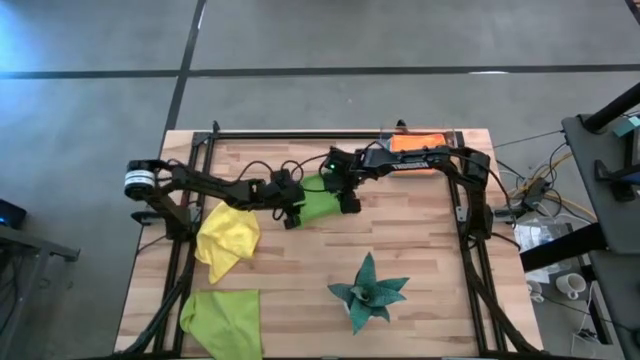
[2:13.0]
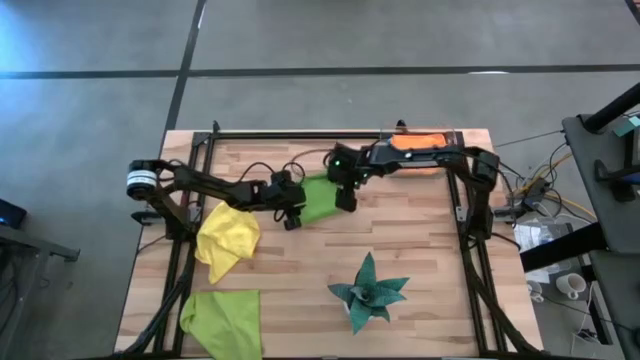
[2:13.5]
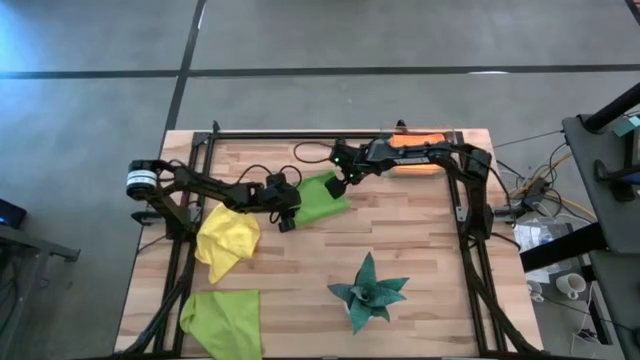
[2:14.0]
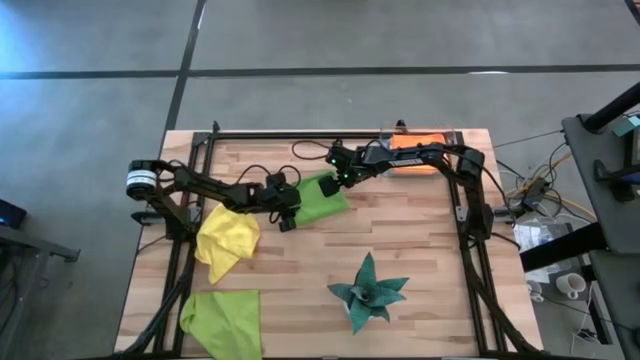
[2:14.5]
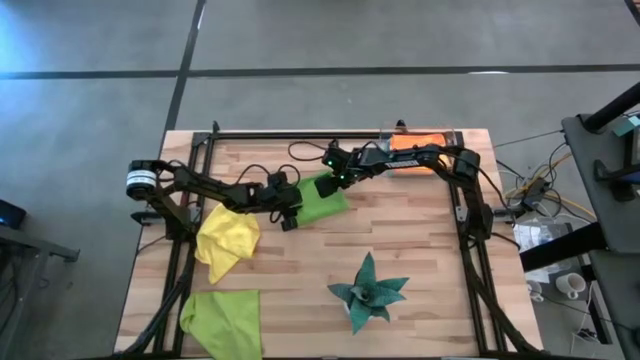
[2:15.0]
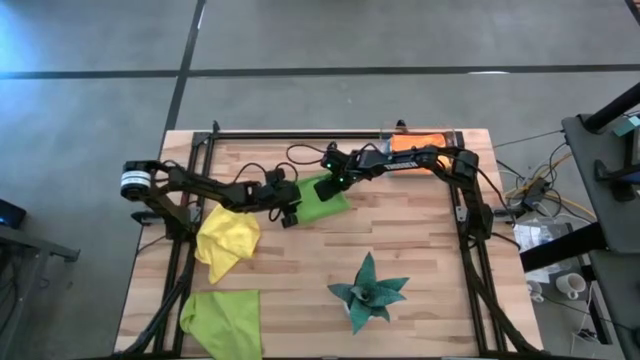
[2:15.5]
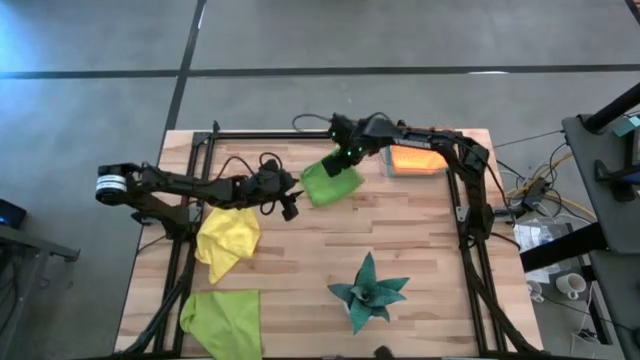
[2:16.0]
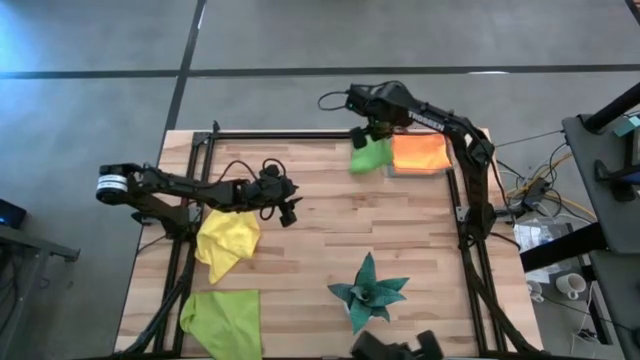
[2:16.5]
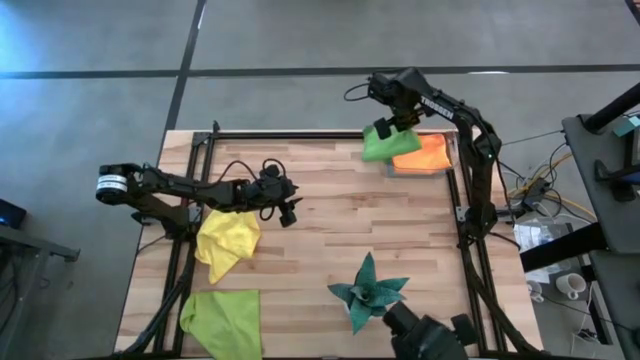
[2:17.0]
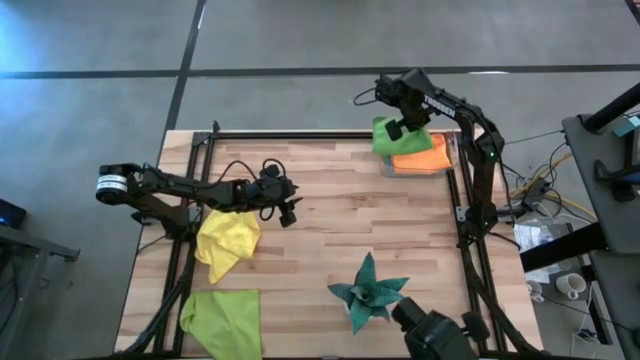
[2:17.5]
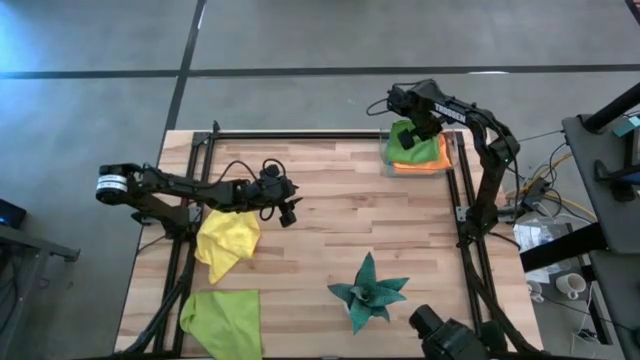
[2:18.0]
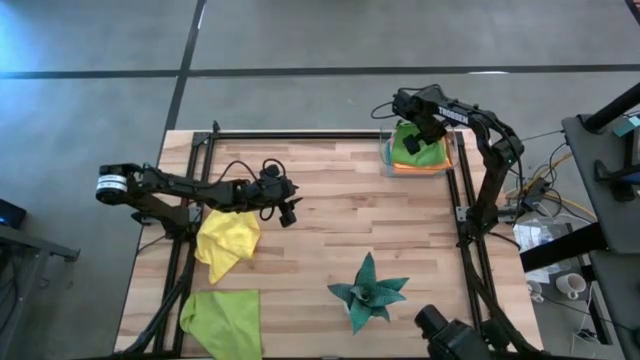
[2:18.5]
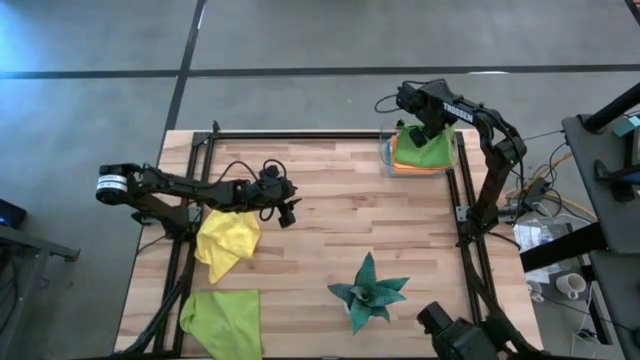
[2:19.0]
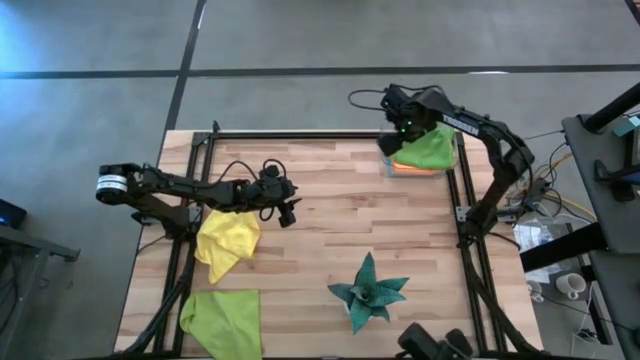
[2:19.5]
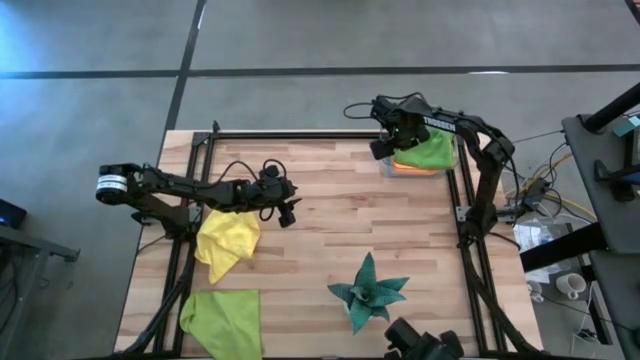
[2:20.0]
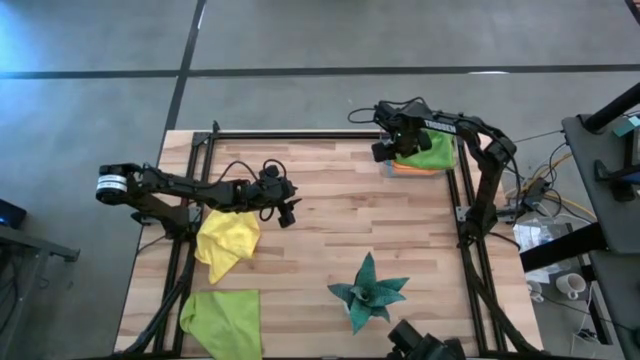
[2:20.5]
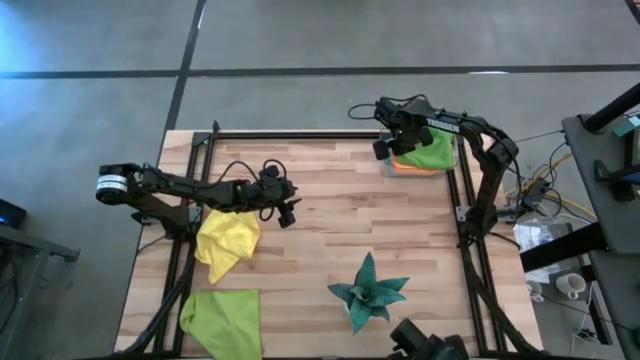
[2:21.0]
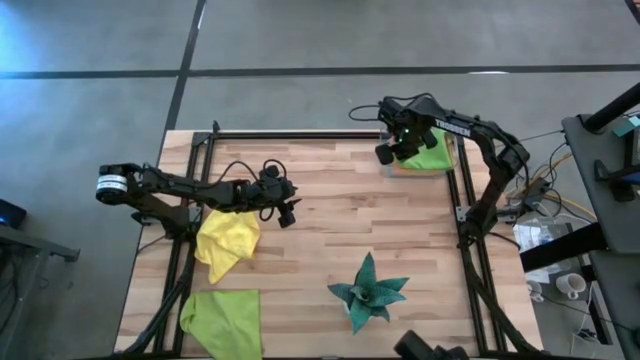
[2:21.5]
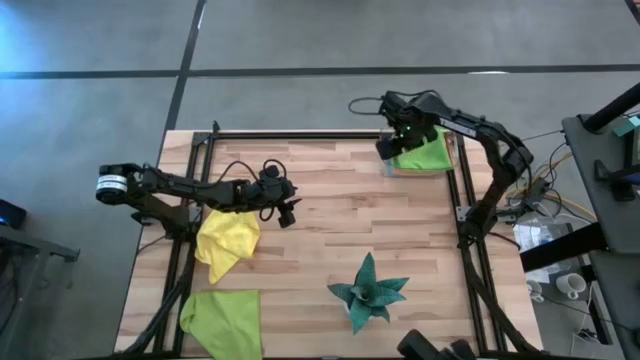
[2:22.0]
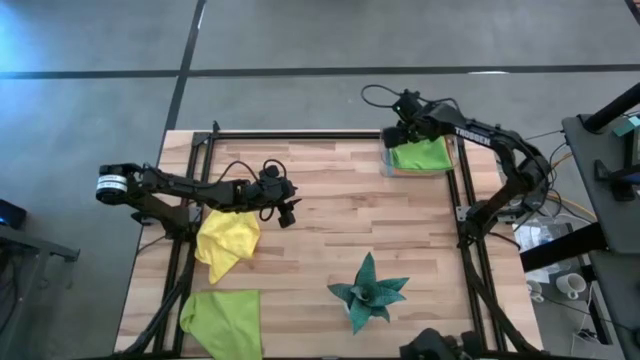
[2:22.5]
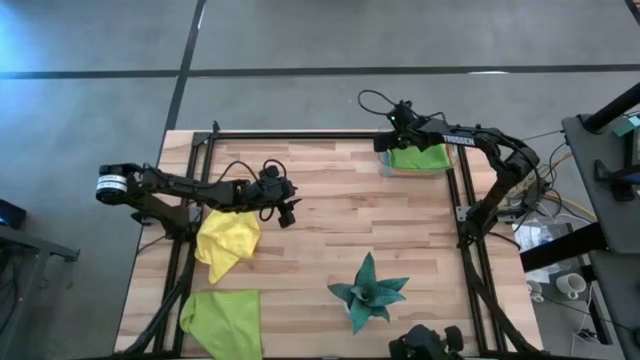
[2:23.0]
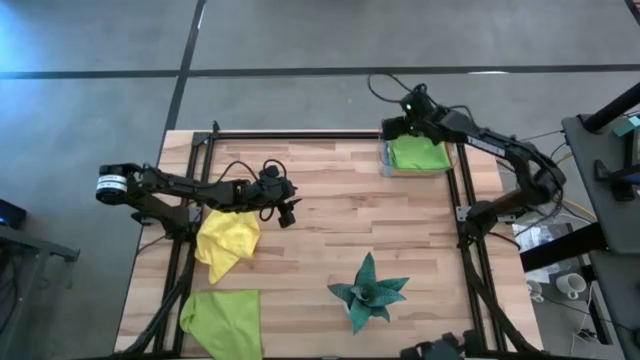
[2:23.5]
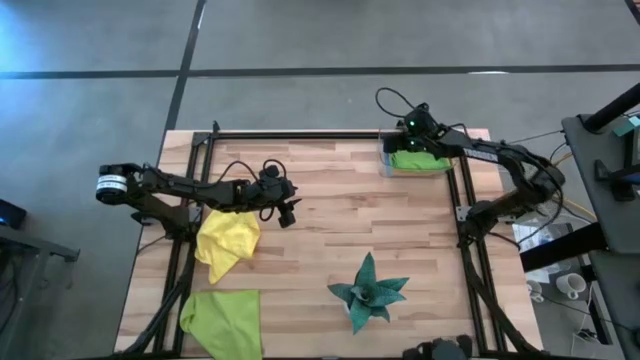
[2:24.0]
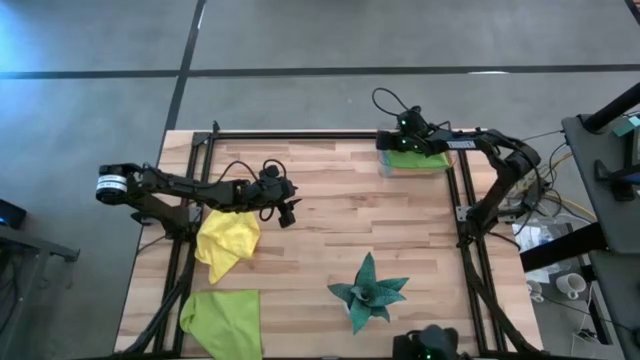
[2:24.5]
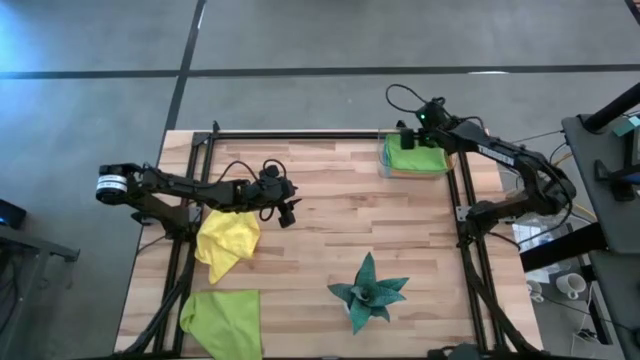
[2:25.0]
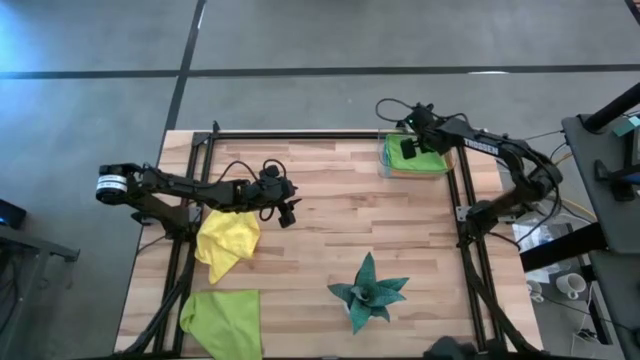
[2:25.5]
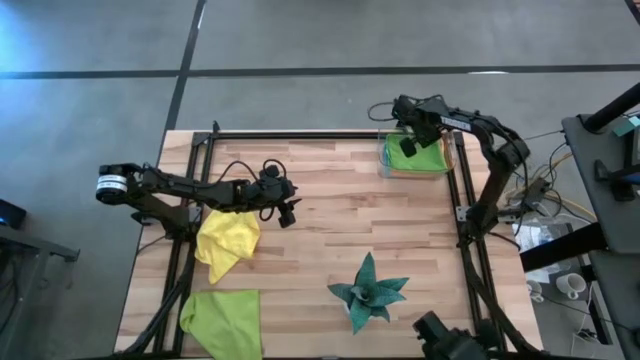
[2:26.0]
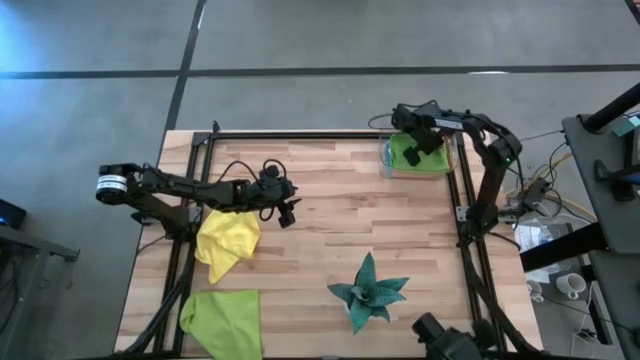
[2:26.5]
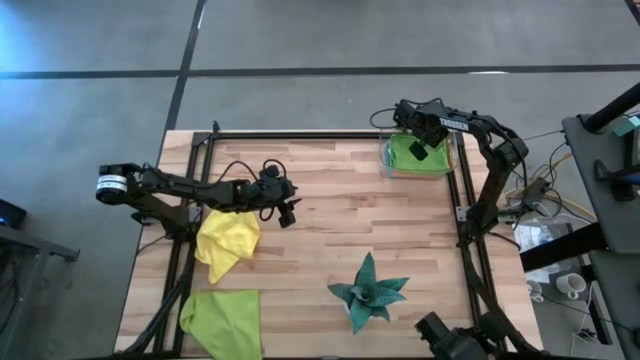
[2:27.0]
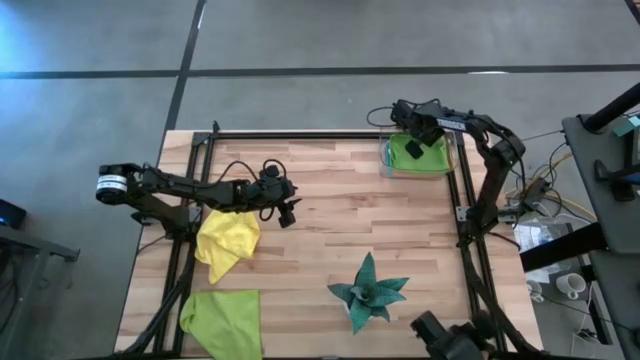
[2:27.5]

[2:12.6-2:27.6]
Task: Fold microfiber towels
Put the green microfiber cloth into the transparent bin

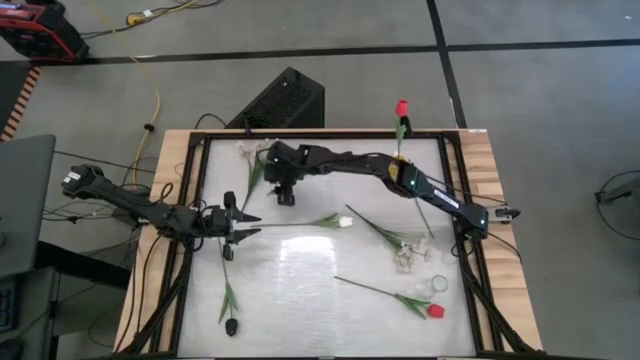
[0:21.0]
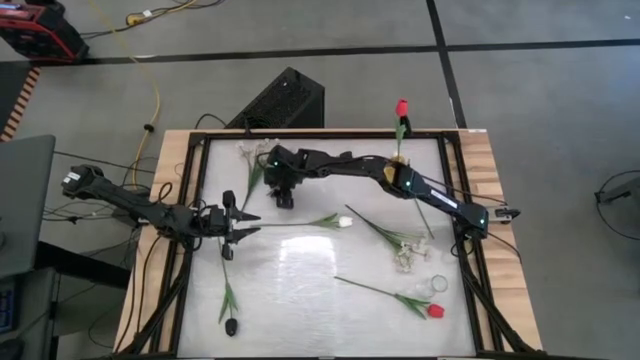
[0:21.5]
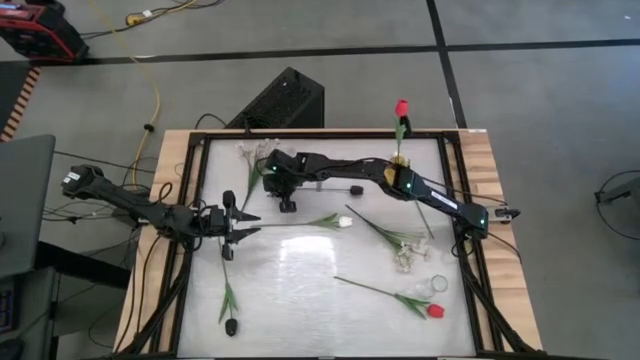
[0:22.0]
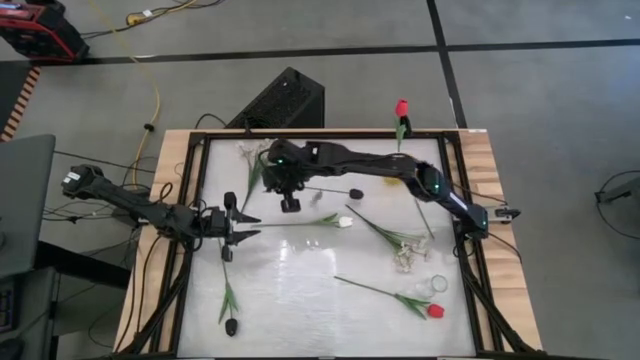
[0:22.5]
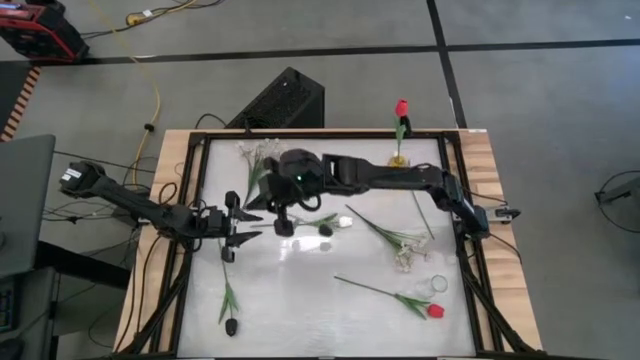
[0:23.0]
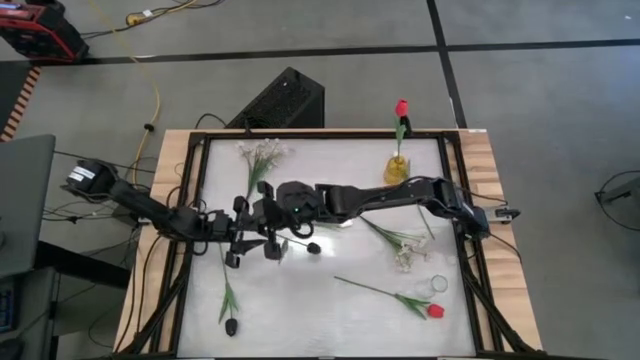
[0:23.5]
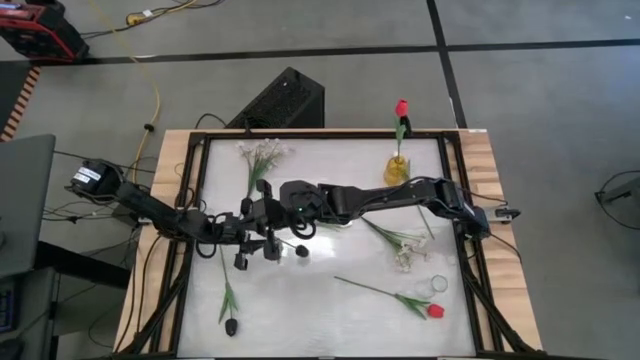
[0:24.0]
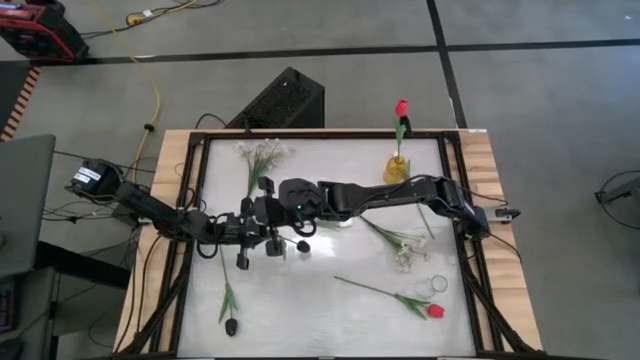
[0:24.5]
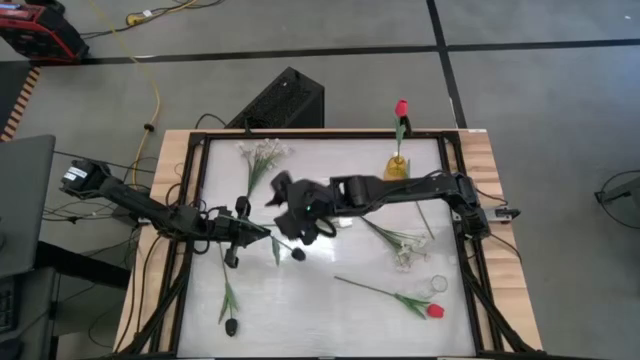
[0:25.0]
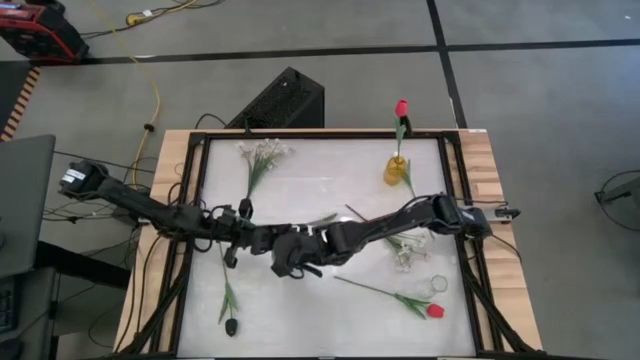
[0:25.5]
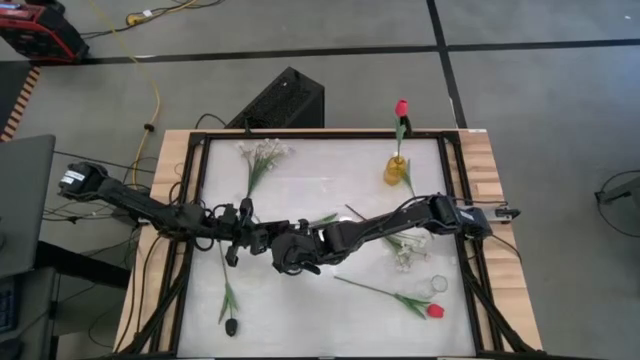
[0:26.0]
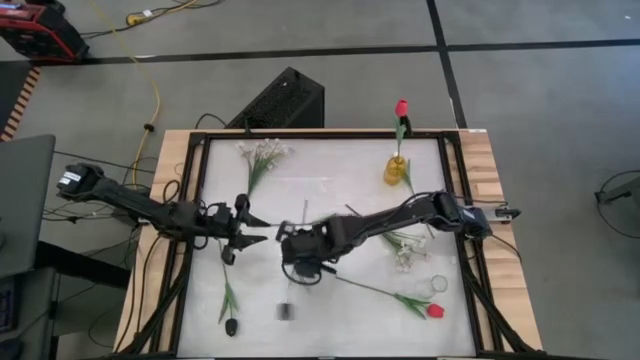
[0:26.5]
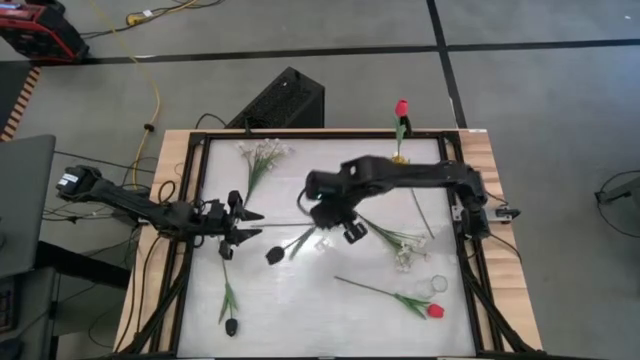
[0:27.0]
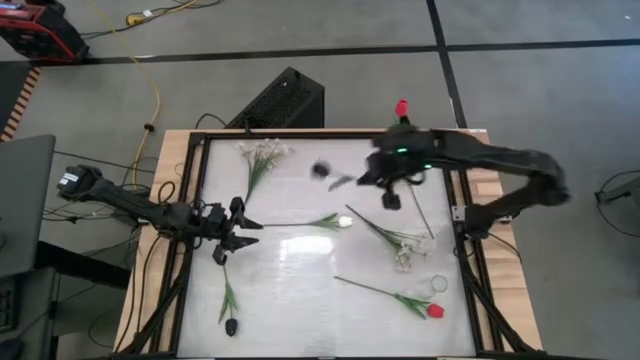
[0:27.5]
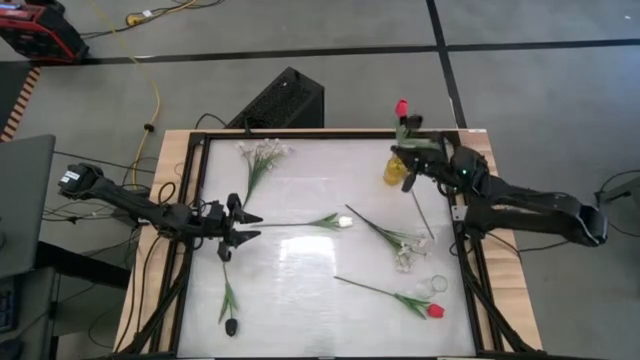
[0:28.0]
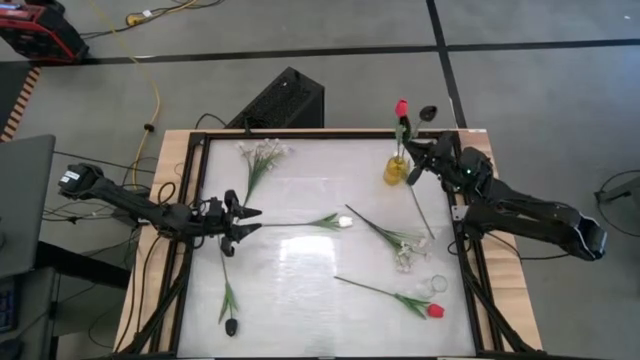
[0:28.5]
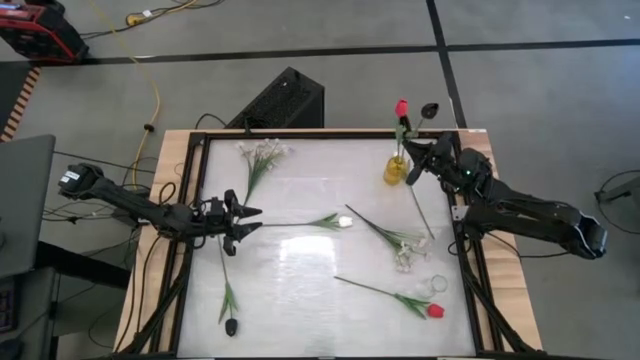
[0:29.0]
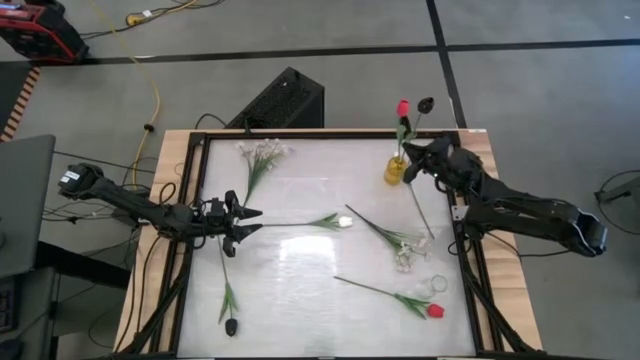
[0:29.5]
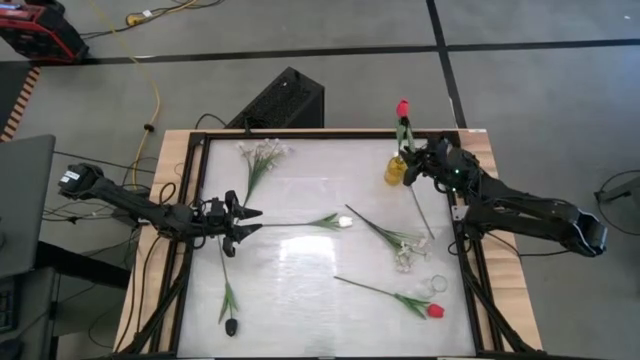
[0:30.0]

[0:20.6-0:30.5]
Task: Sort flowers into vase by color
Put the top black flower into the yellow flower vase
